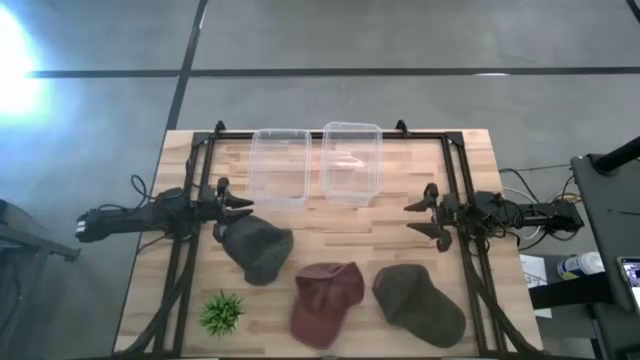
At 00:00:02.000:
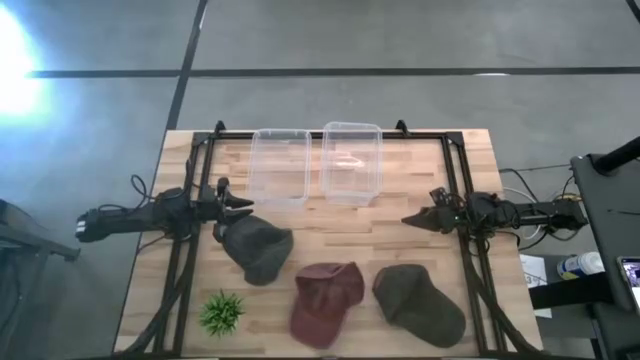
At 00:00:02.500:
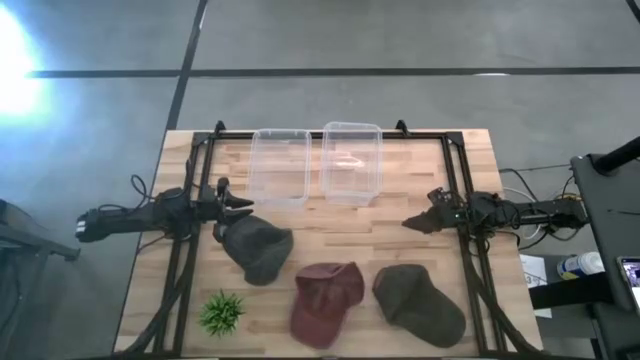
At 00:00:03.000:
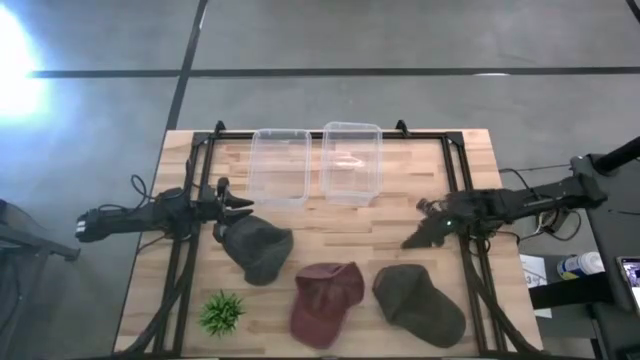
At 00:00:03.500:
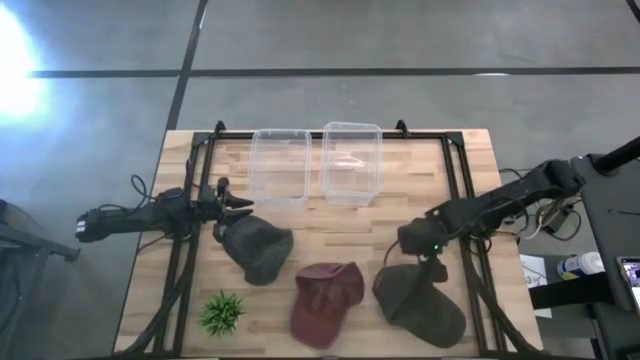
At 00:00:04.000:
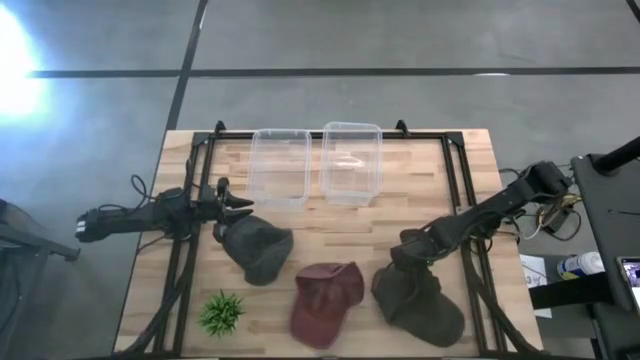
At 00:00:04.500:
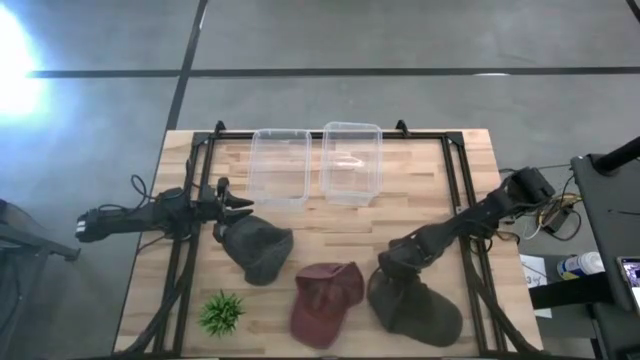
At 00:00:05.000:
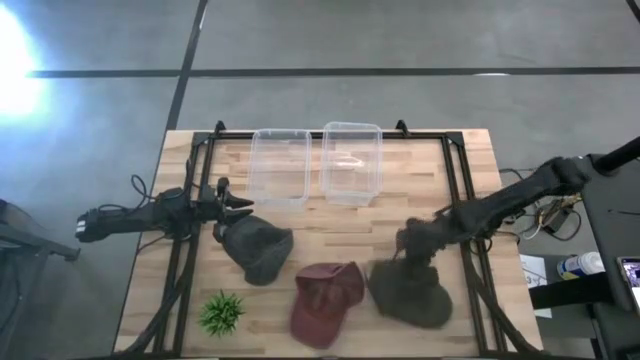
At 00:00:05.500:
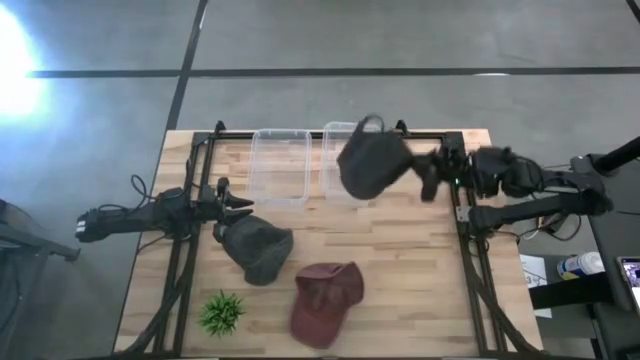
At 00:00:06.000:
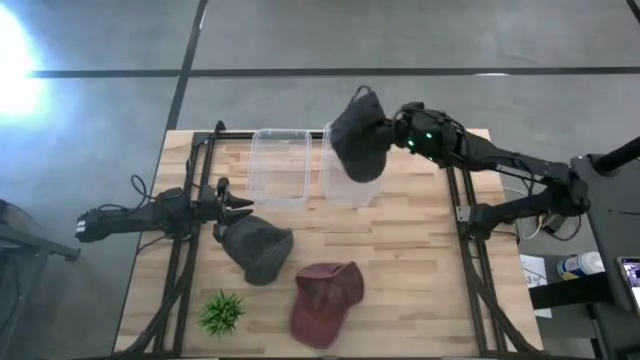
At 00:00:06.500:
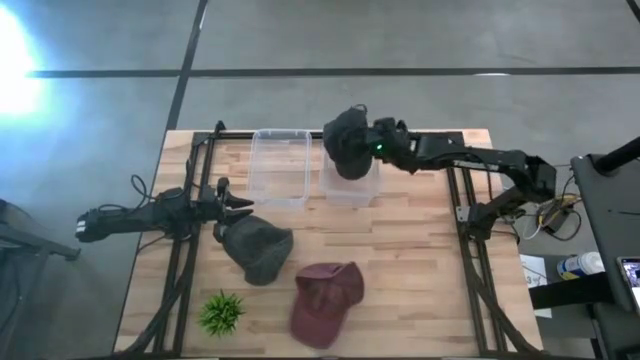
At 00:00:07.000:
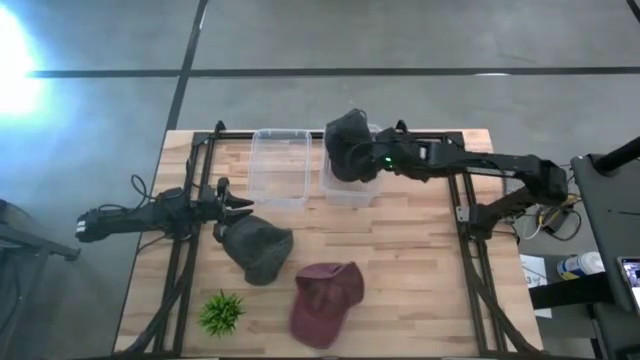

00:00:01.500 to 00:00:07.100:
Task: Pick & Place hat
Put the bottom black cap into the right transparent bin

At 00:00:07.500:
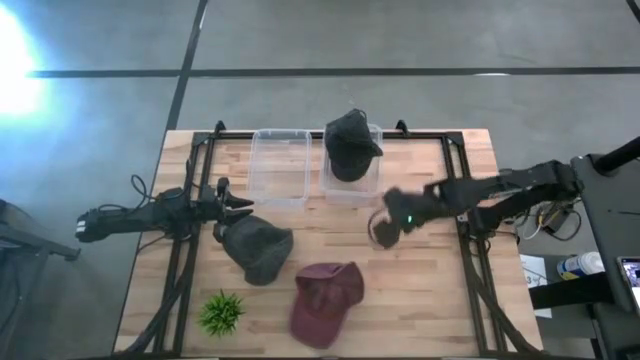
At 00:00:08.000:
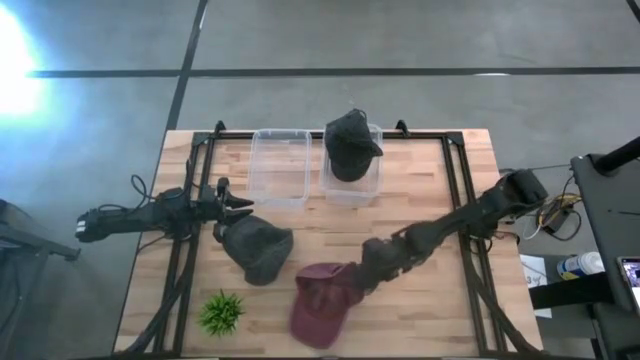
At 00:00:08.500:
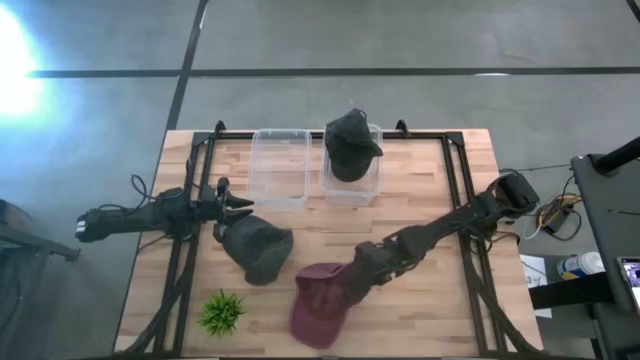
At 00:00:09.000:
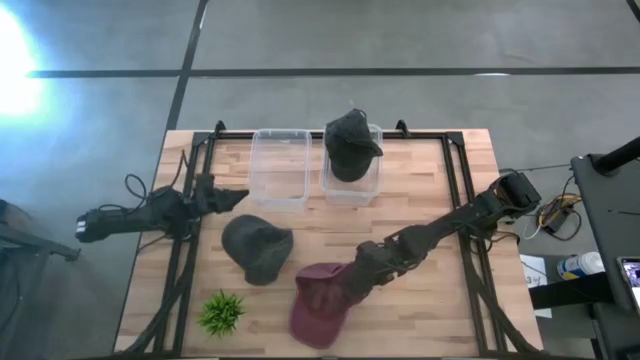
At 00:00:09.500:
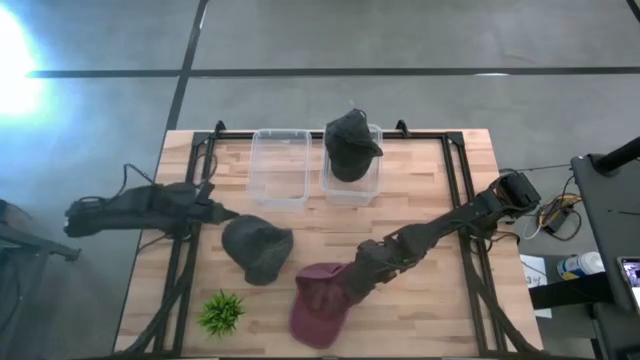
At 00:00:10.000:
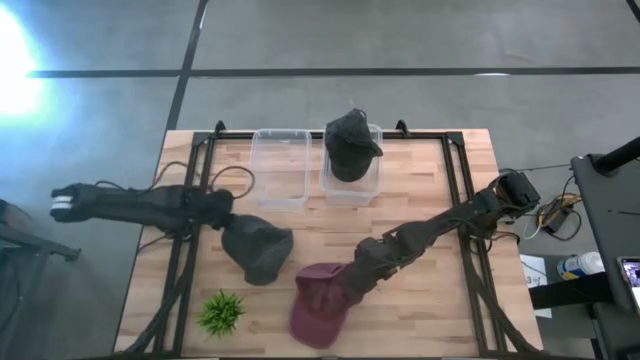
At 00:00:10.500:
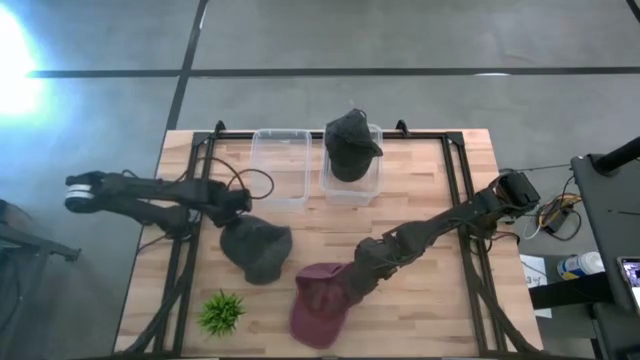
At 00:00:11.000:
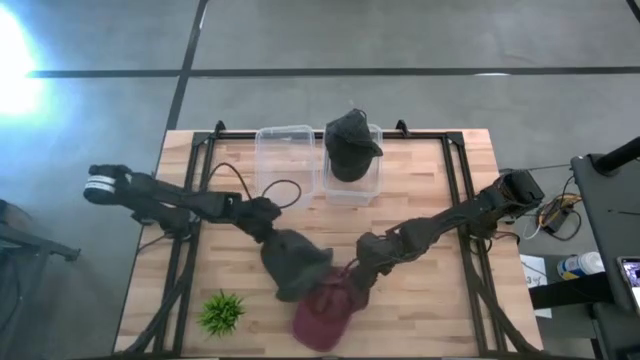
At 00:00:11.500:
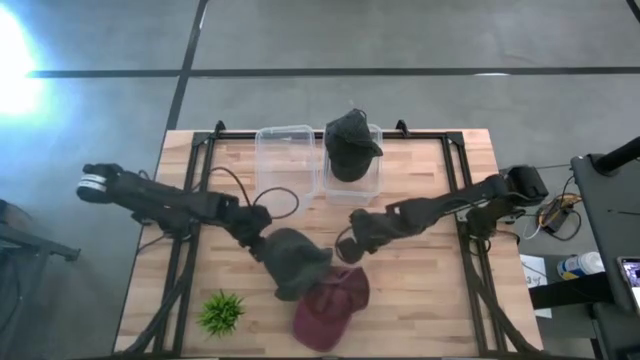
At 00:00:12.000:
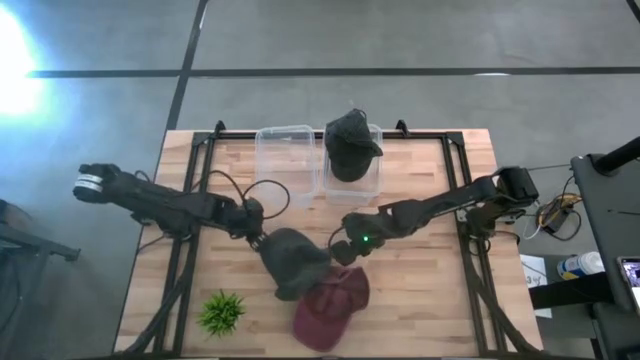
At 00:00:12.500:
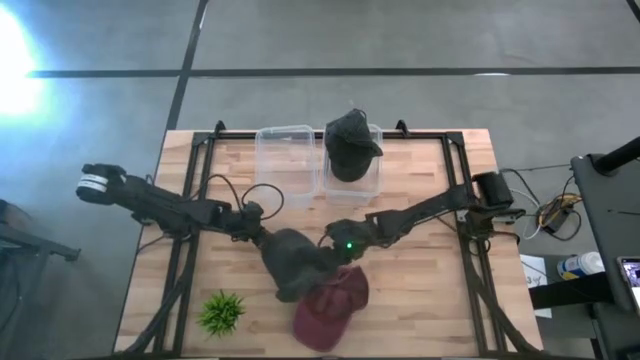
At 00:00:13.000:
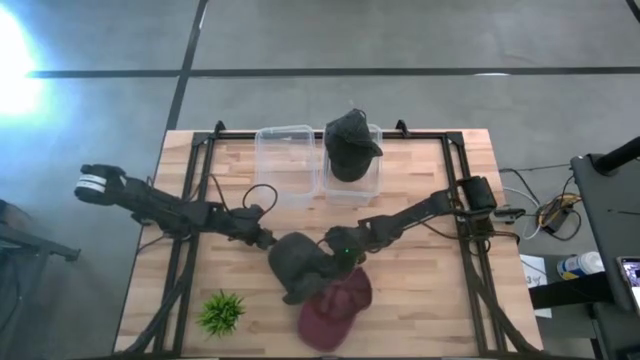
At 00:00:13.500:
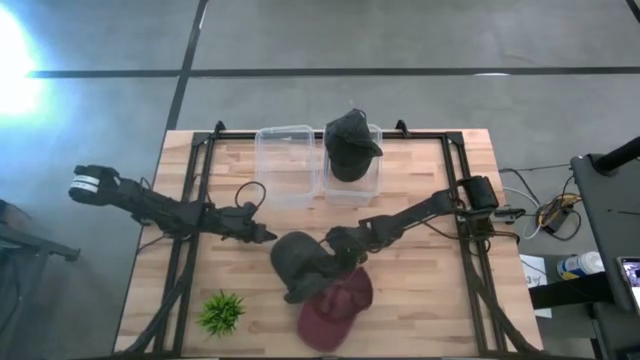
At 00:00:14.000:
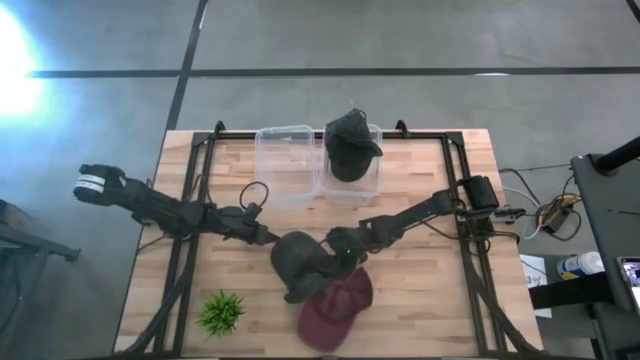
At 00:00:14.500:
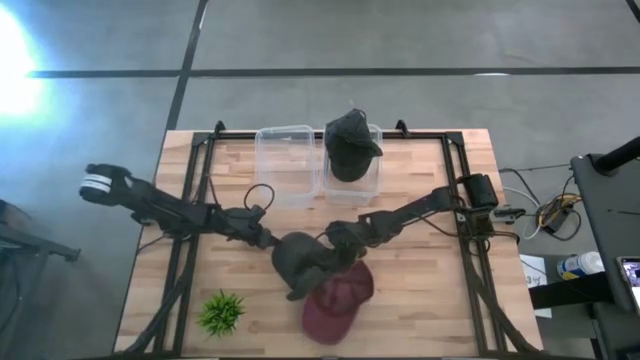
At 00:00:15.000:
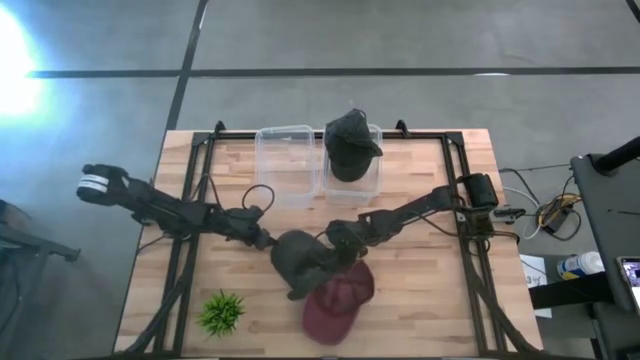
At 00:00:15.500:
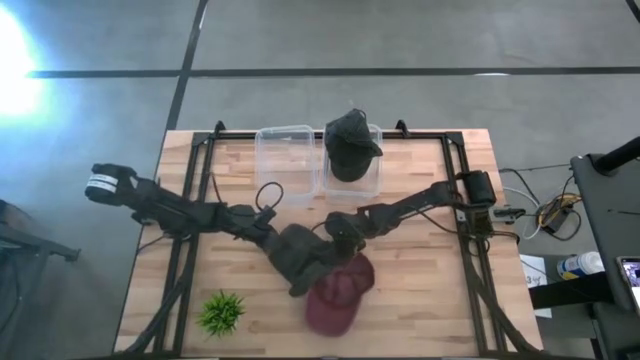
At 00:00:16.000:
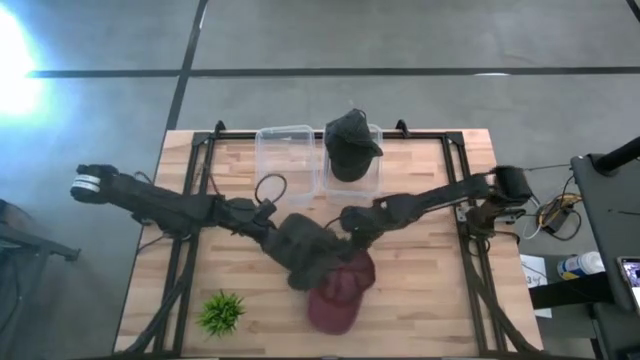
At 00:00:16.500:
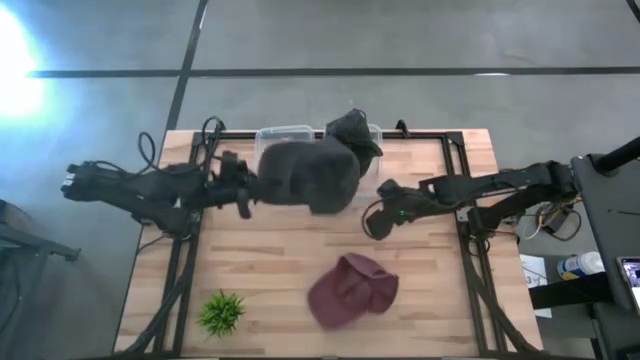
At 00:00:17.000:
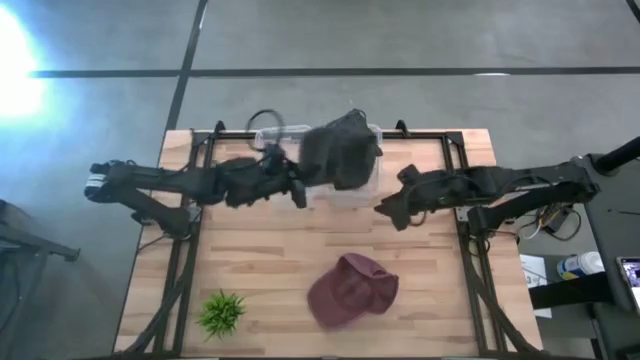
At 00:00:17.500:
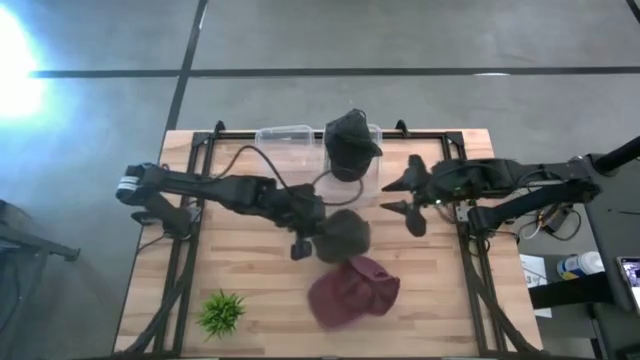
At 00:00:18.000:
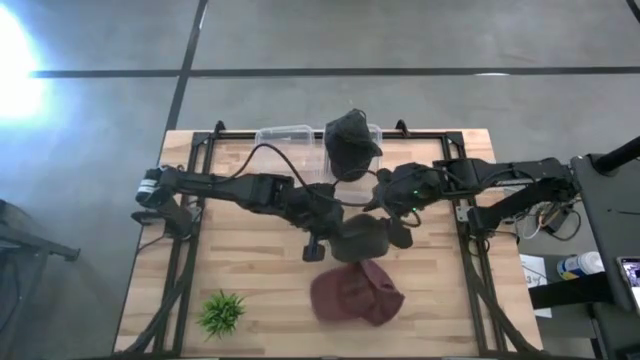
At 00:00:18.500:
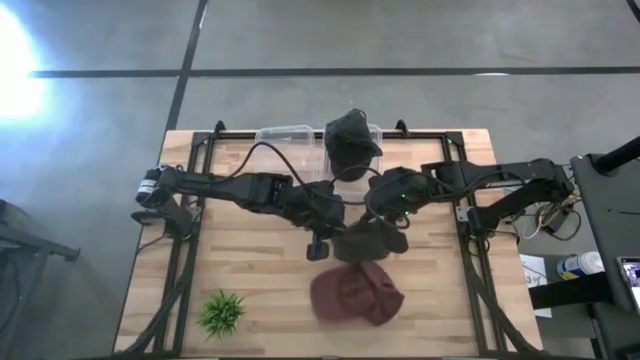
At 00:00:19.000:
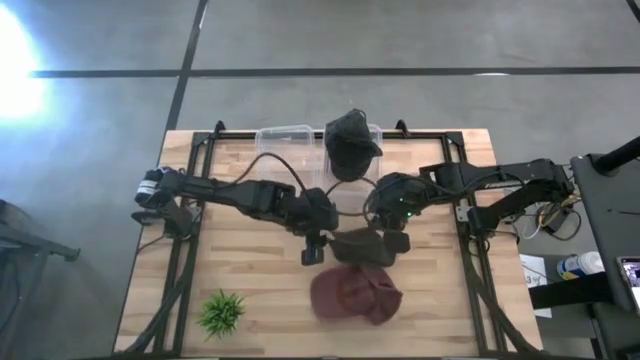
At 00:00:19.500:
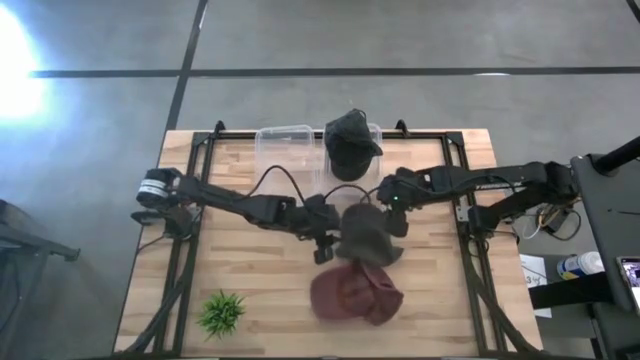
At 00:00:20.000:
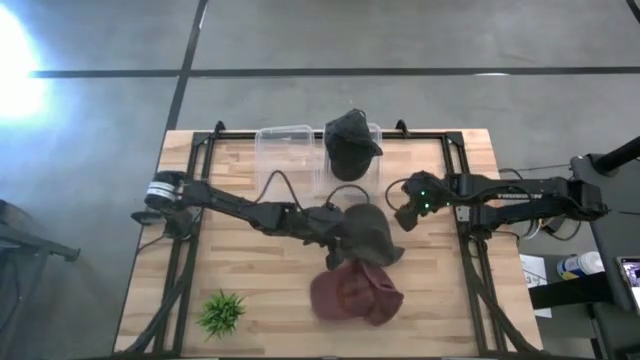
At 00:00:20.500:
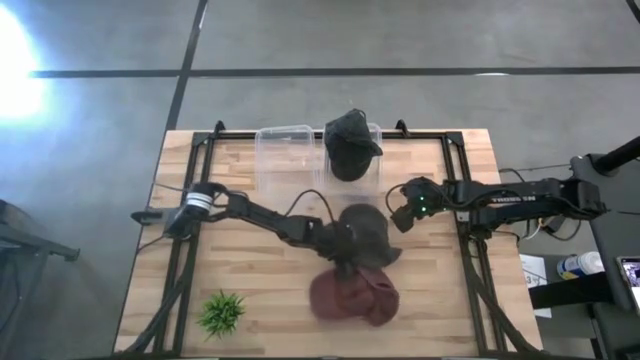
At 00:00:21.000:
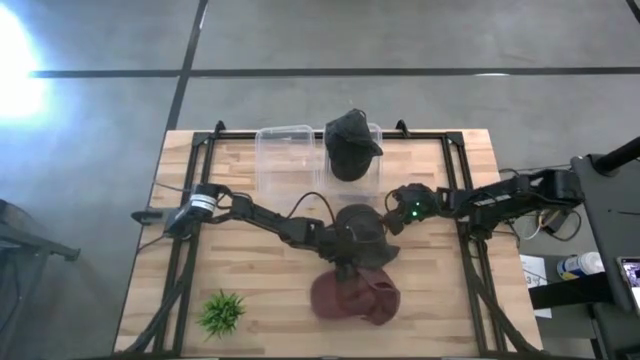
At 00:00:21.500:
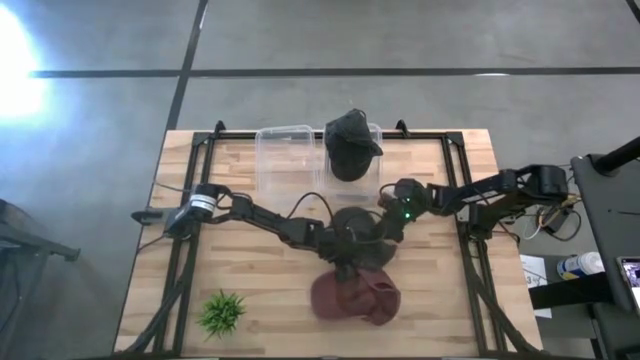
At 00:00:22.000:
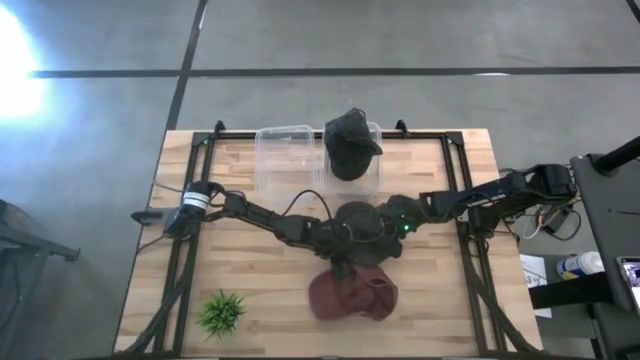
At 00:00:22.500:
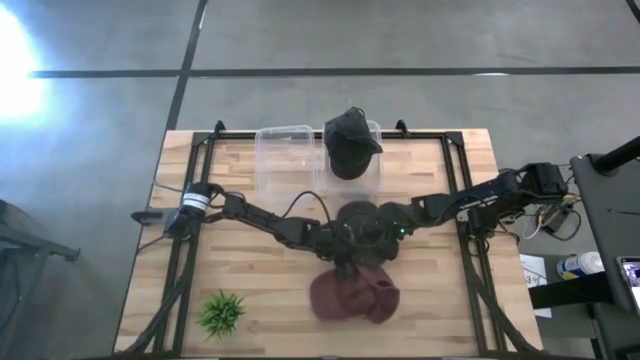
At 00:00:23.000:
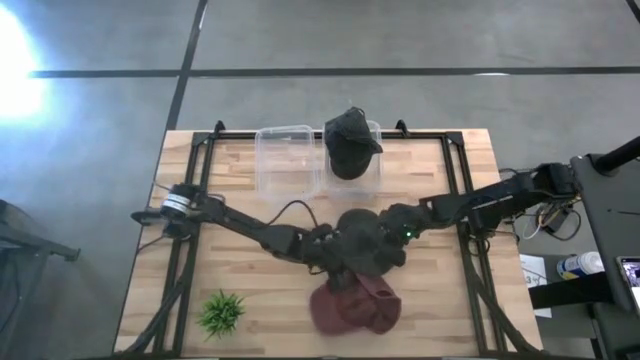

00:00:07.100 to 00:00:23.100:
Put the black cap into the right transparent bin
